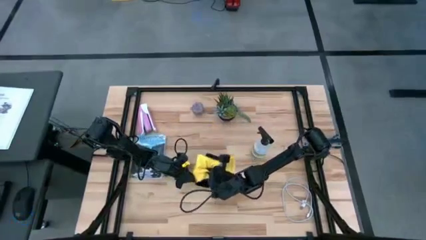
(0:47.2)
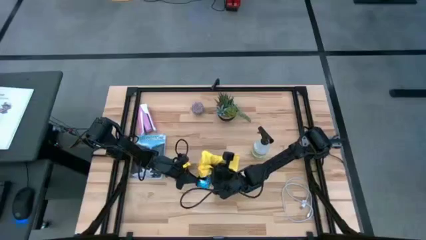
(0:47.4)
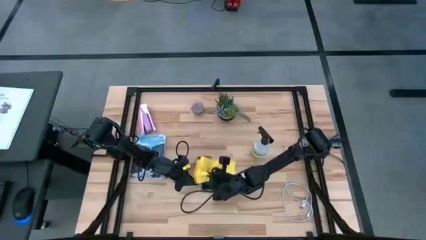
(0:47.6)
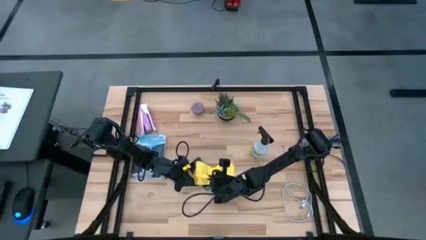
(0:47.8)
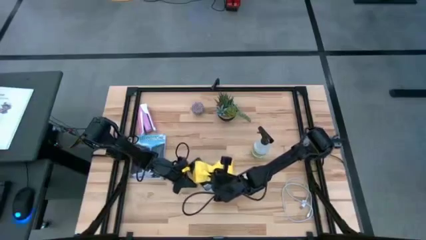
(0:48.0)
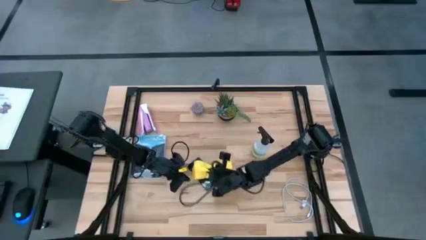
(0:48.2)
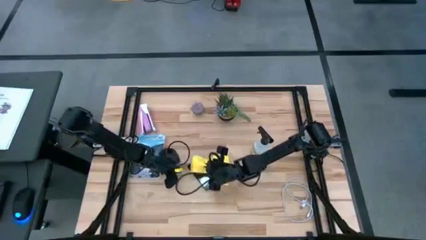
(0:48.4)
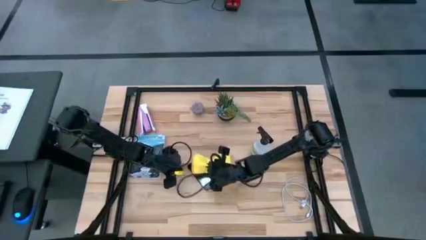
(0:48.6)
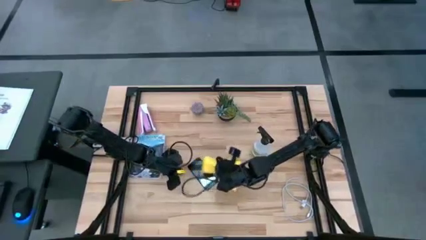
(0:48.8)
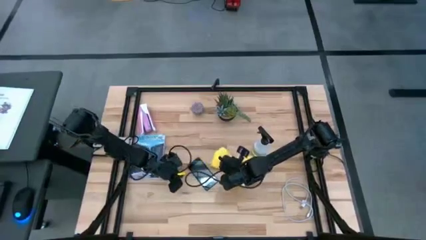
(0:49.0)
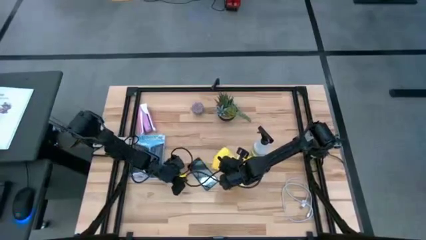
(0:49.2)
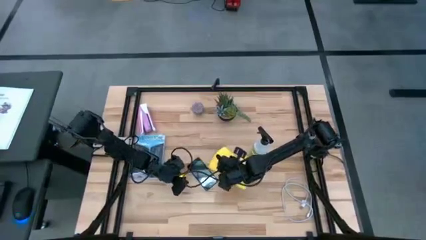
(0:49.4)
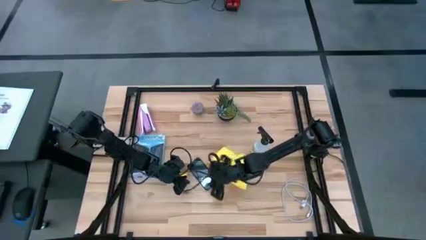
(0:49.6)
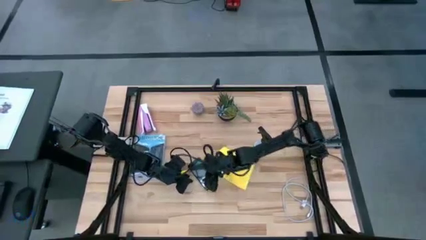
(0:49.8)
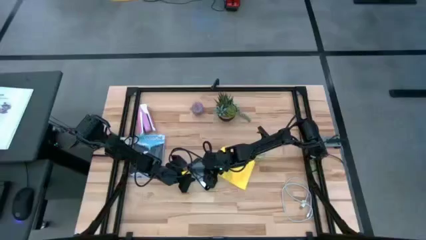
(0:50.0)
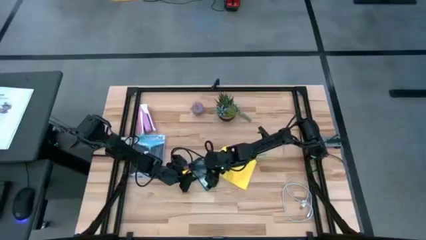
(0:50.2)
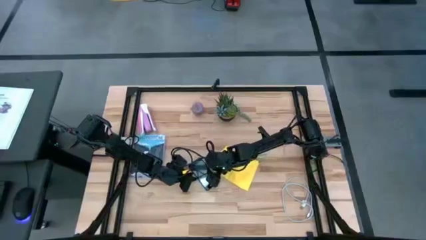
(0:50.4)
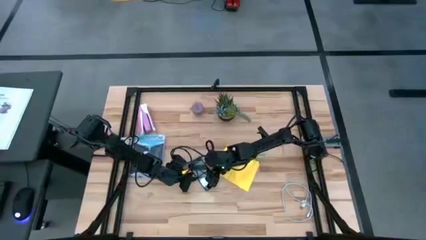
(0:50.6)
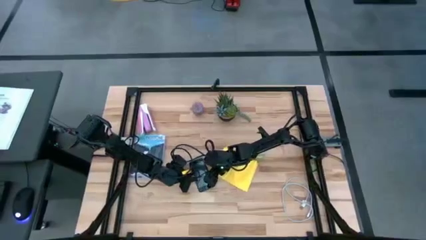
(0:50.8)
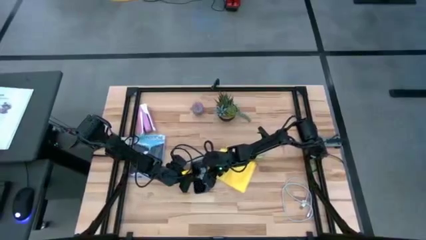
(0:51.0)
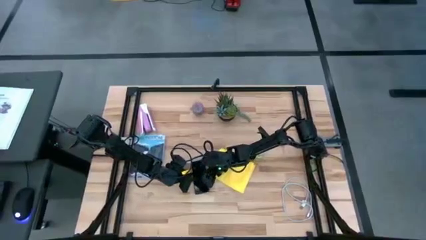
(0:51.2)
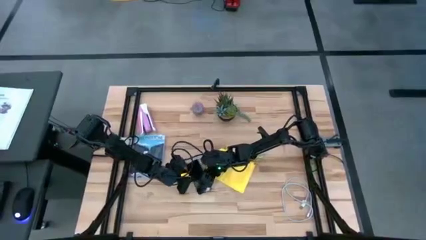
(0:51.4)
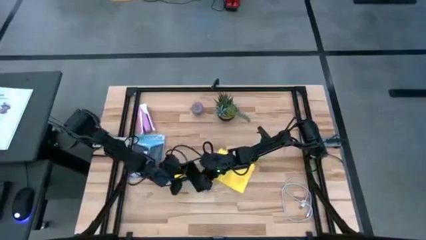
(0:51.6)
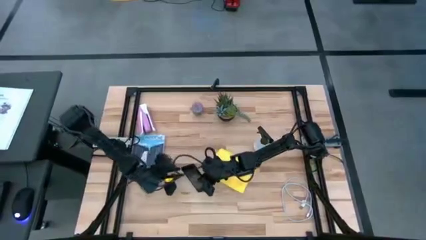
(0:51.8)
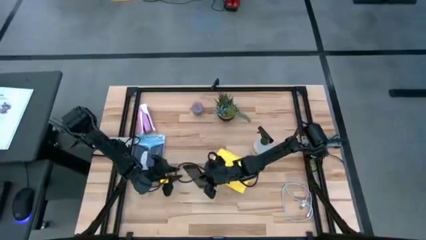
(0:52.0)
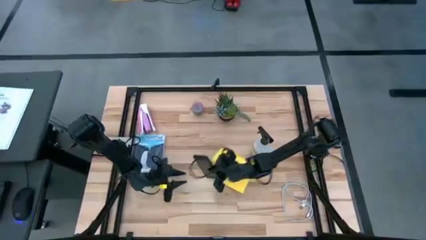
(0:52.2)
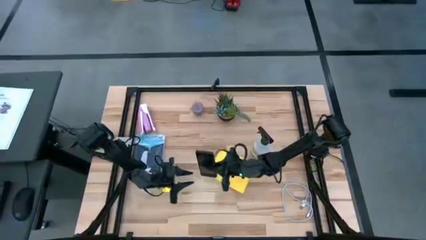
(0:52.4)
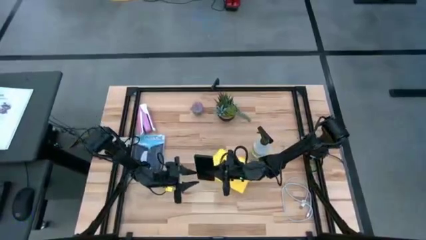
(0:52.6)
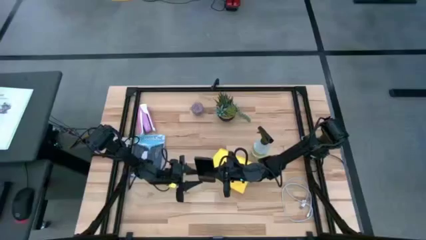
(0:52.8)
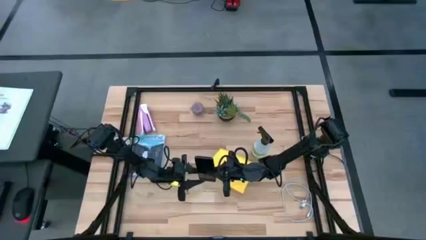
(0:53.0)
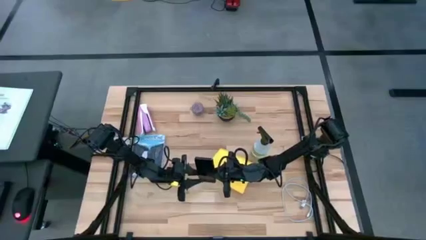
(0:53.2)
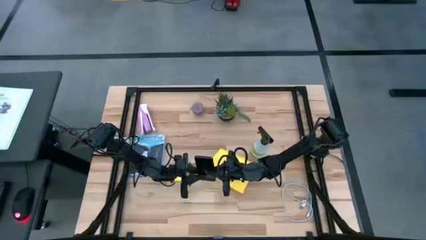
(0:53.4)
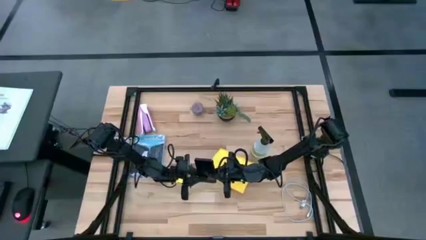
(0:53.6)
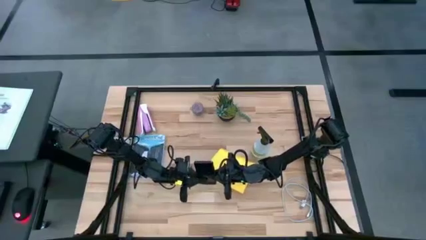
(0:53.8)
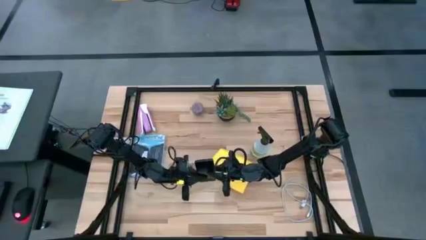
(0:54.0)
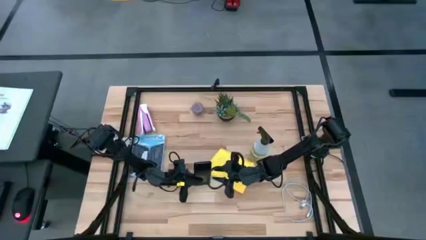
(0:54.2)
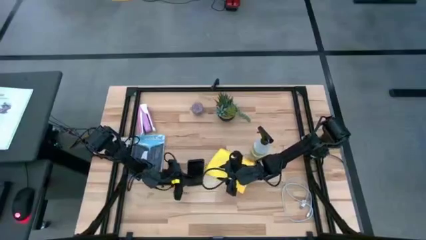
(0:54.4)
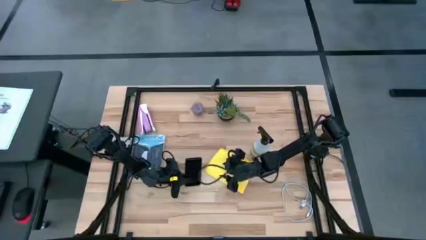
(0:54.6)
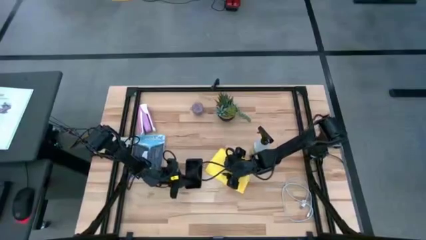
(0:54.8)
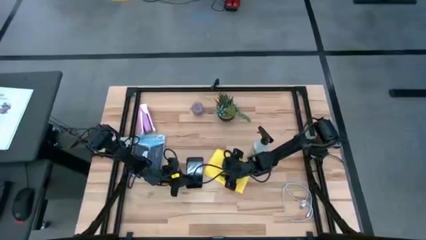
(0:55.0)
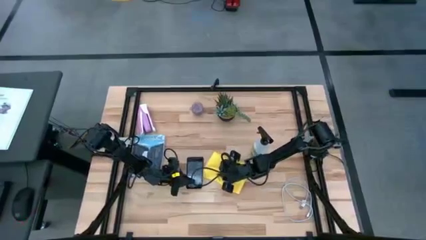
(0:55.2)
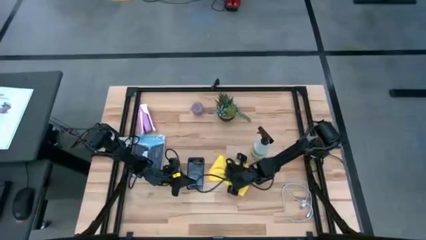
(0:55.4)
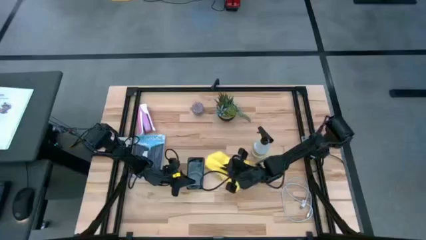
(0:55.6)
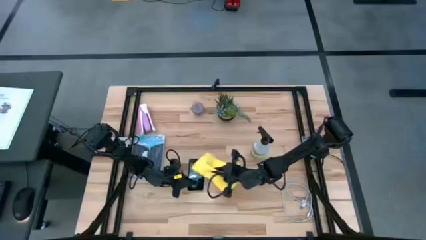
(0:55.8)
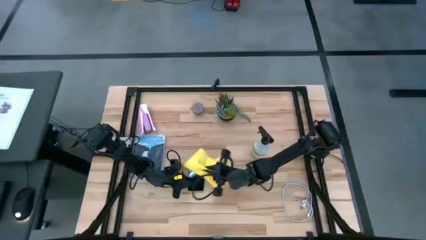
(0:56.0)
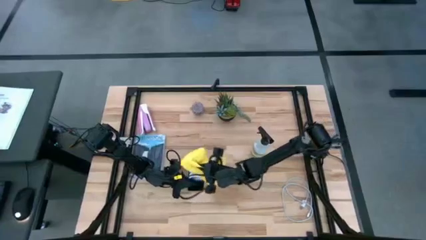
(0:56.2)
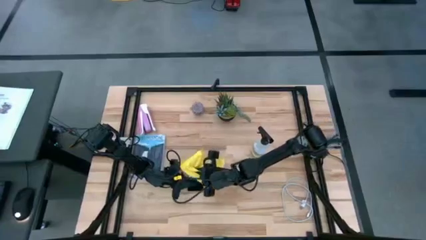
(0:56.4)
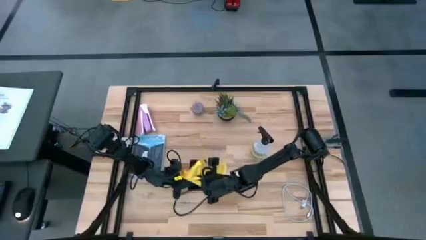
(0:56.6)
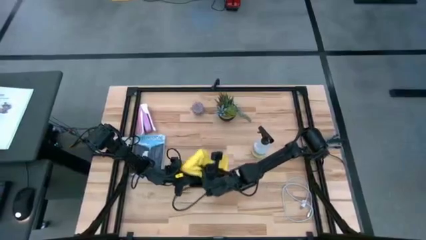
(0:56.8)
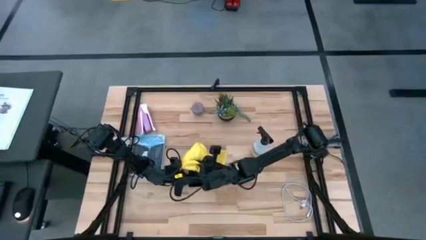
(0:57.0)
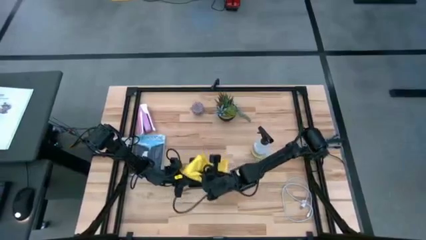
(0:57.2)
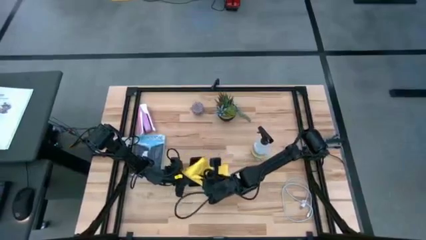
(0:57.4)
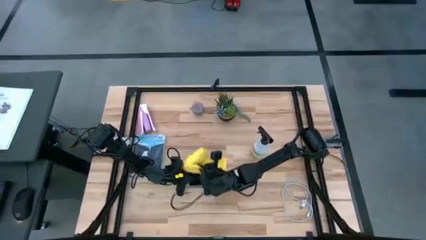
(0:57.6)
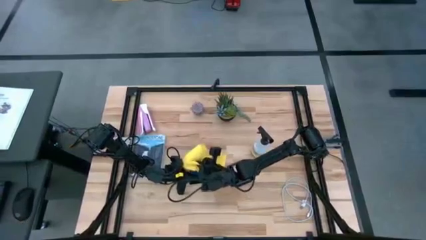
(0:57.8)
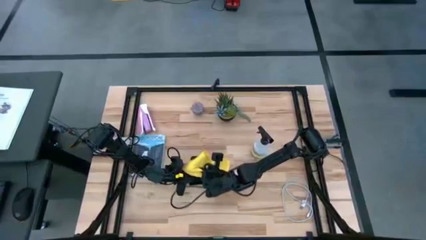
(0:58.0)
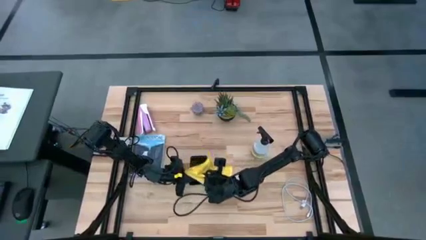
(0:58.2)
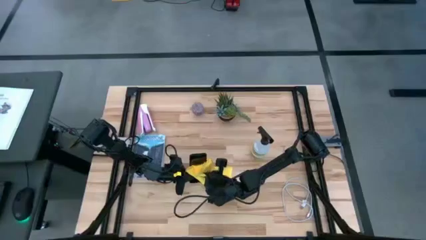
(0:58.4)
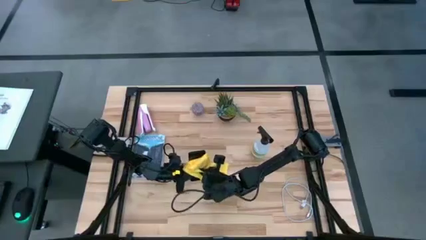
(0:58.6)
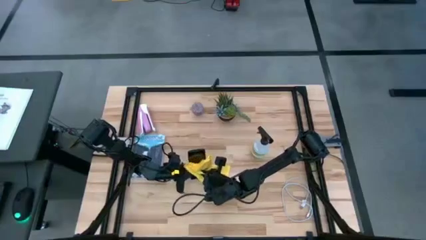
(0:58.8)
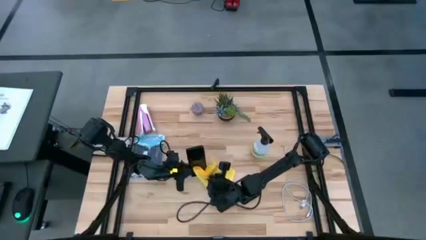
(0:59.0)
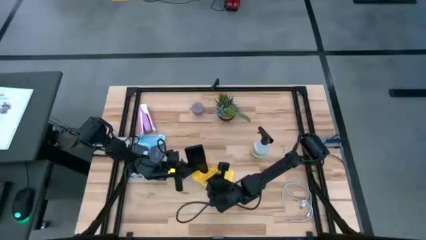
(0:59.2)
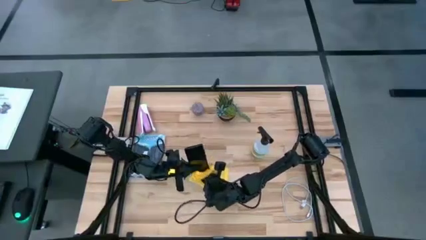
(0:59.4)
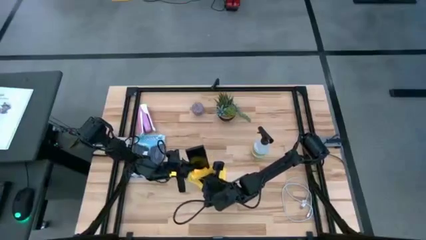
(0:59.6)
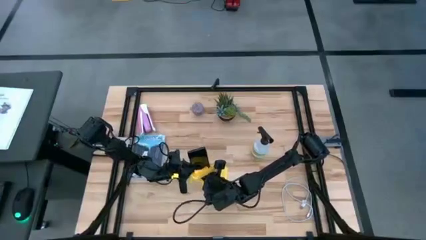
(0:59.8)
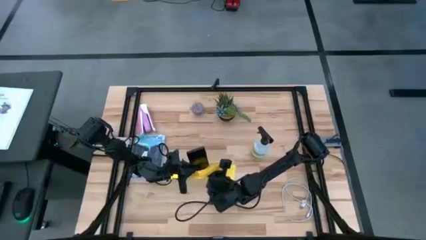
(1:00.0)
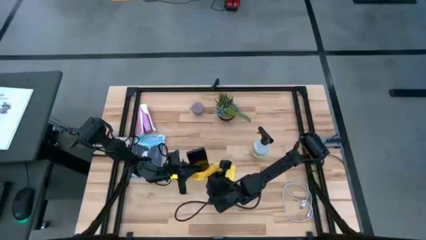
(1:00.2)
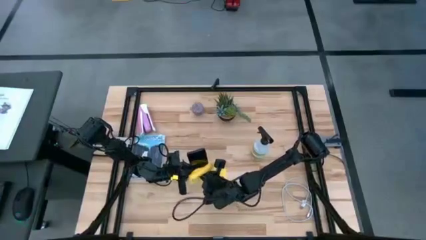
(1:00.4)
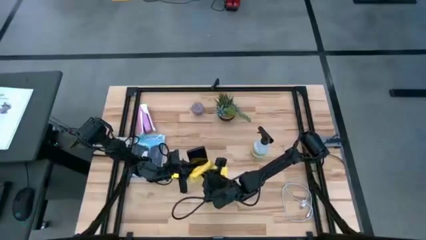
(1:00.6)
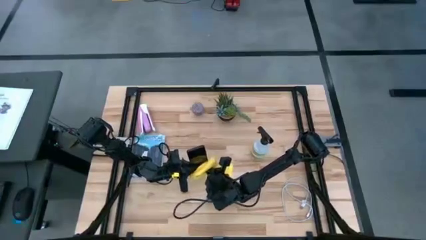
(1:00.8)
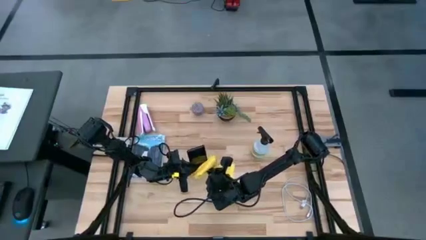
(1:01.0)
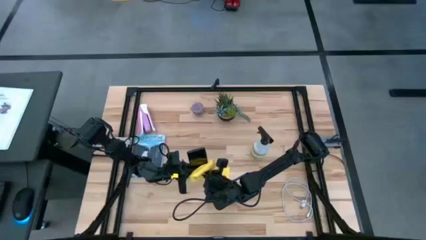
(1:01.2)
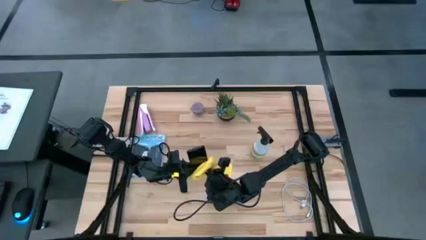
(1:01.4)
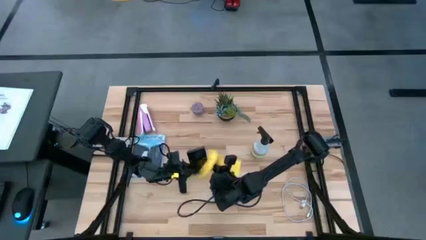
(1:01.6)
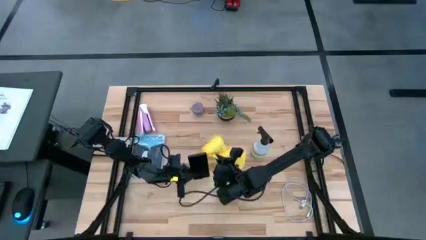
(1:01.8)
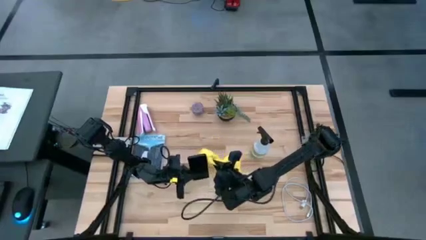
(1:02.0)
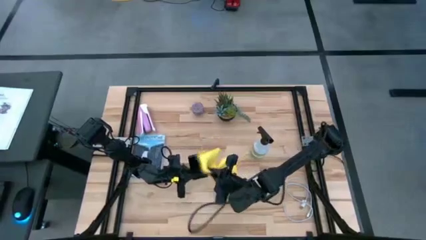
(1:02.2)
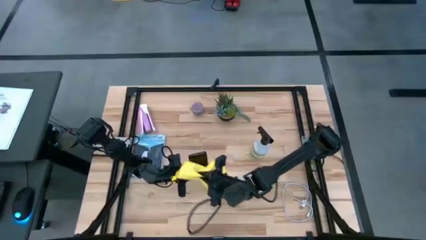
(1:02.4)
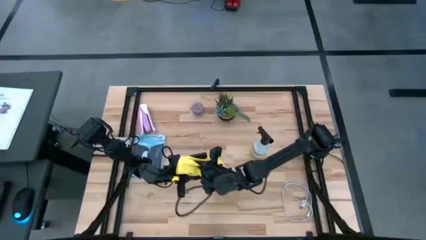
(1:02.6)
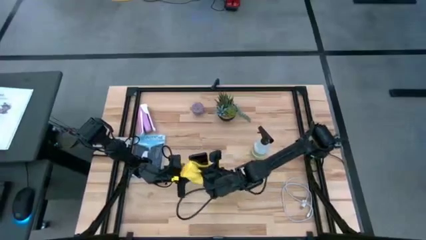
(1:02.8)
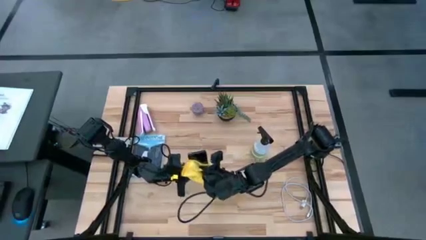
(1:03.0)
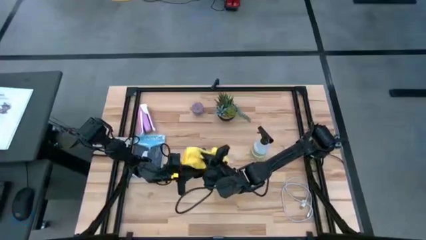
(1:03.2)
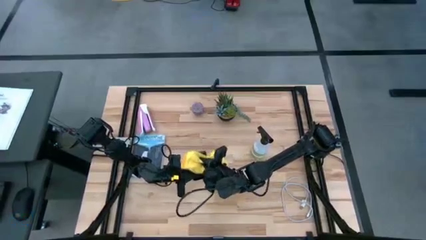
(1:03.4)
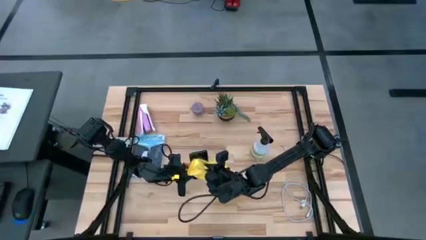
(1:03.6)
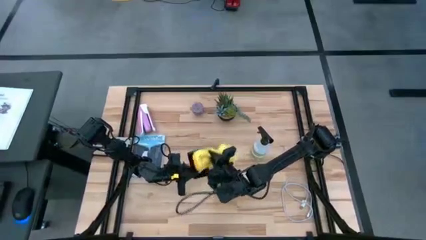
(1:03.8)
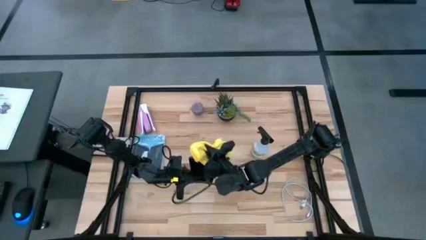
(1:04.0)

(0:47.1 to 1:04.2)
Task: Apply microfiber cloth
Wipe the cellphone with the microfiber cloth
